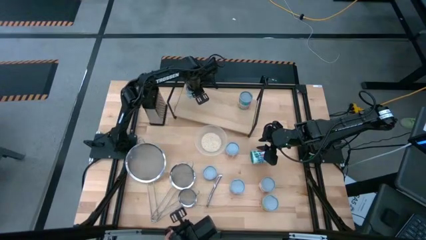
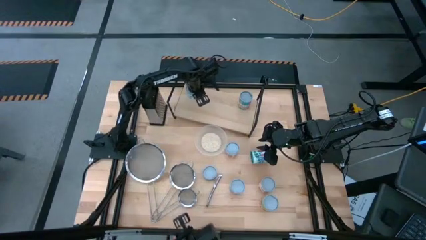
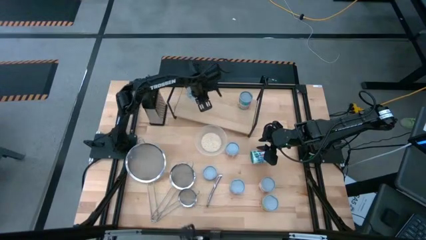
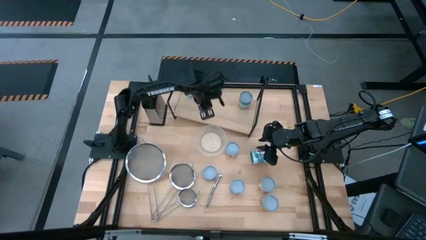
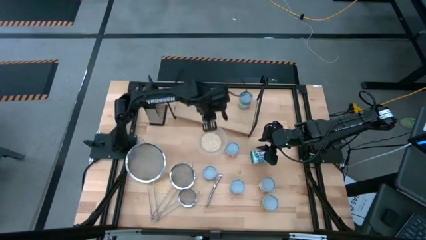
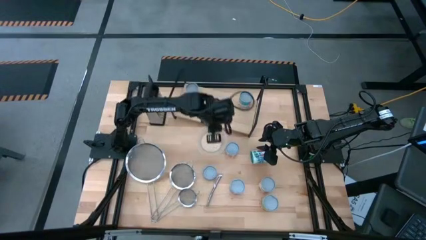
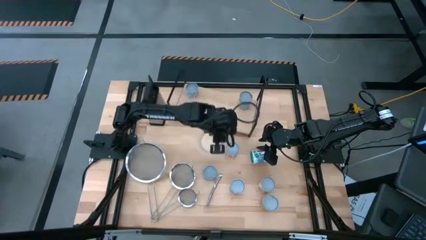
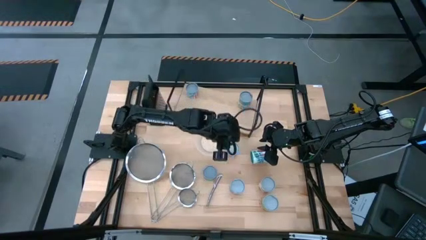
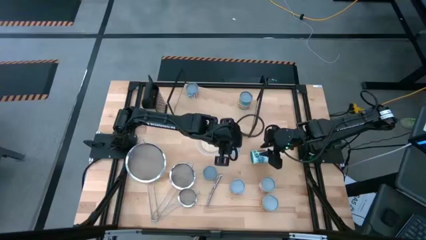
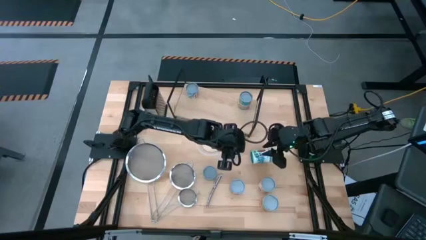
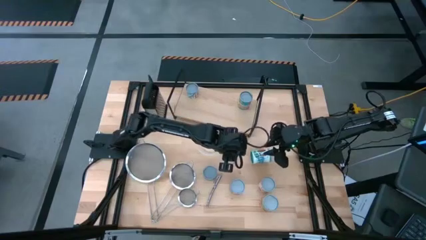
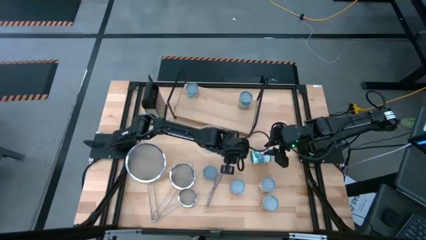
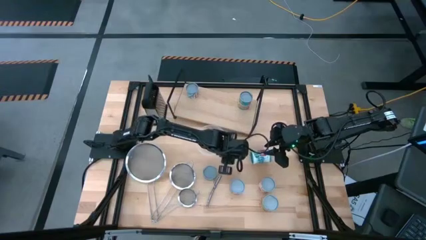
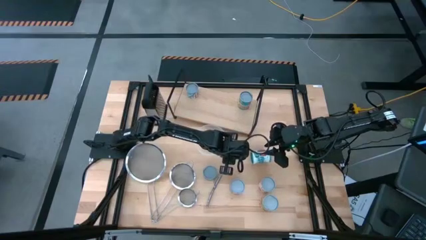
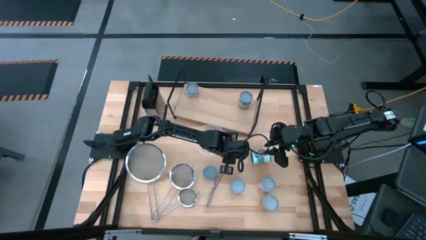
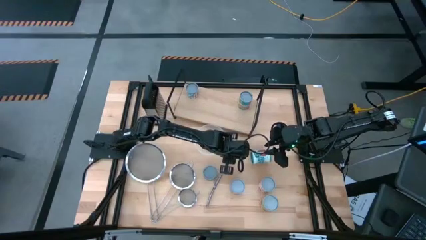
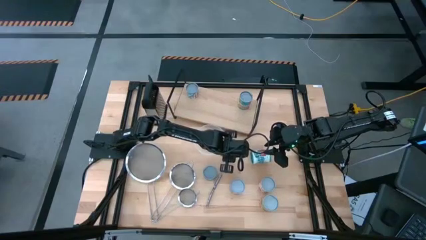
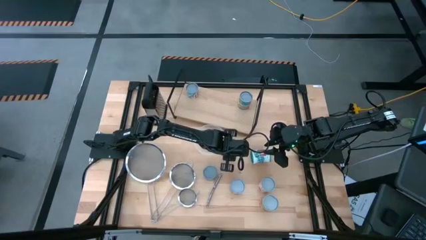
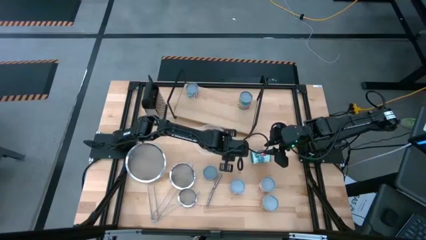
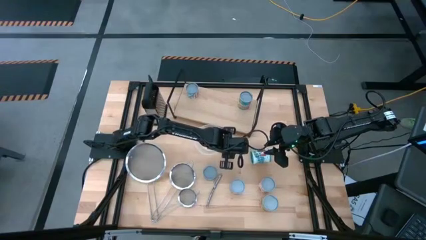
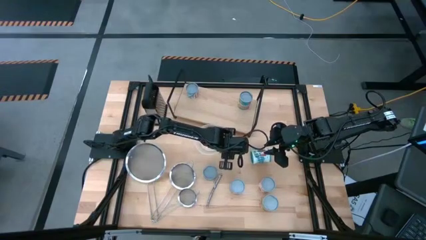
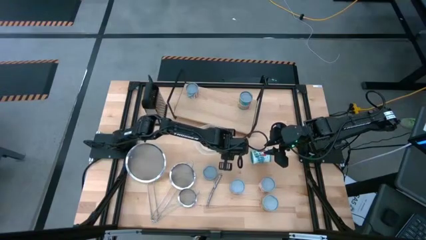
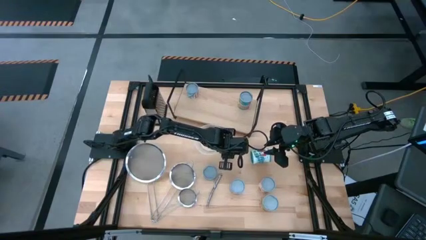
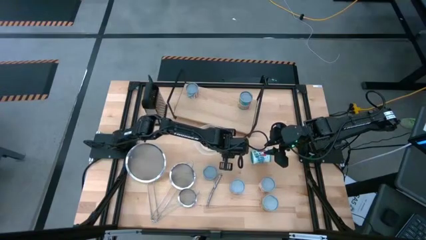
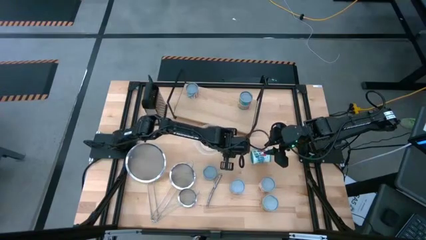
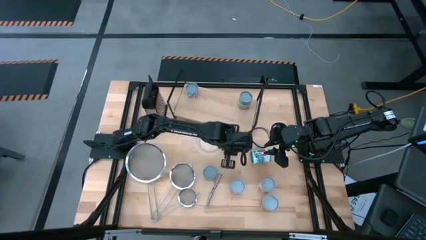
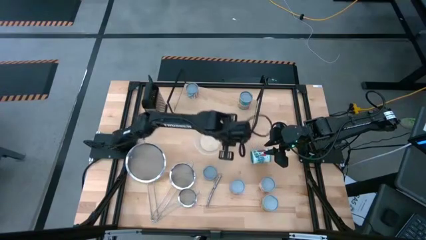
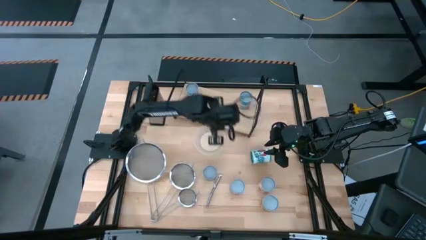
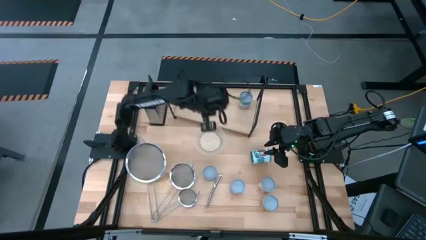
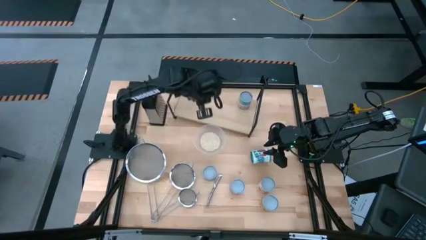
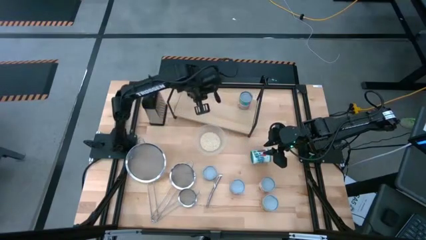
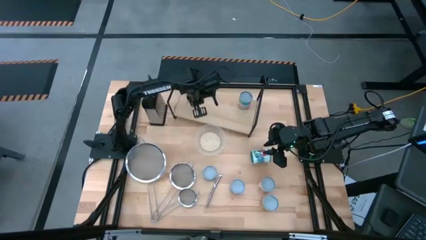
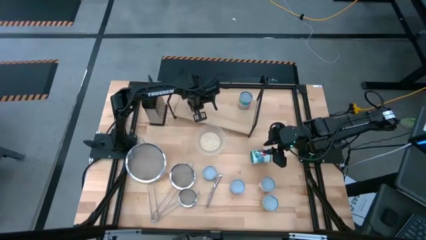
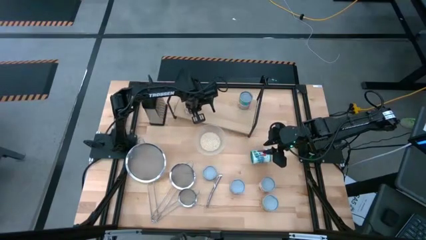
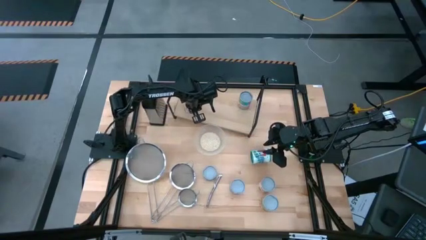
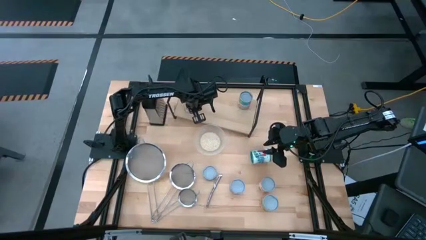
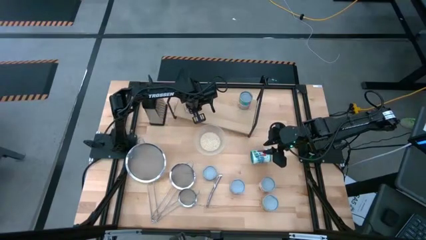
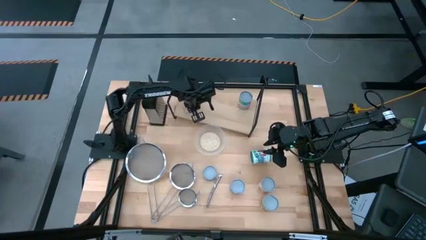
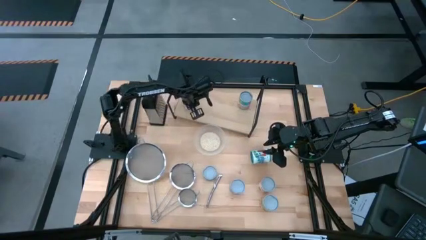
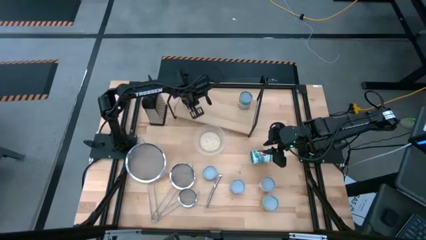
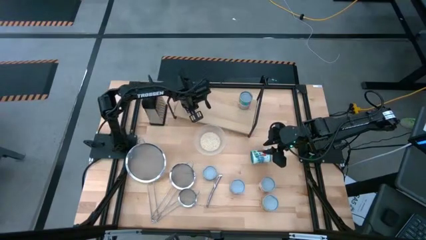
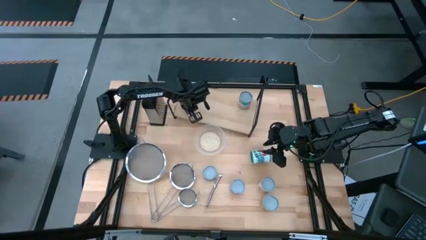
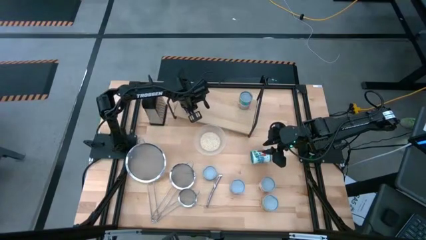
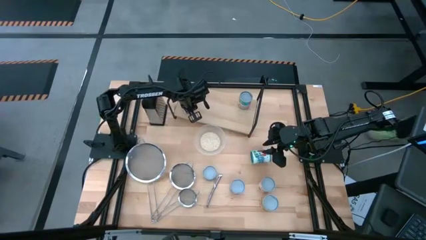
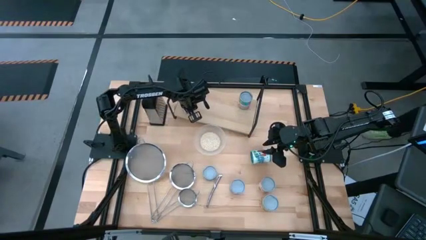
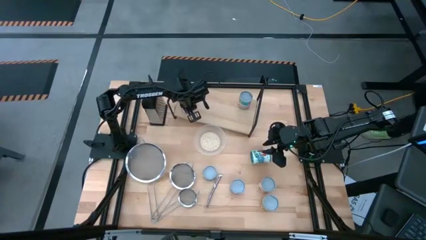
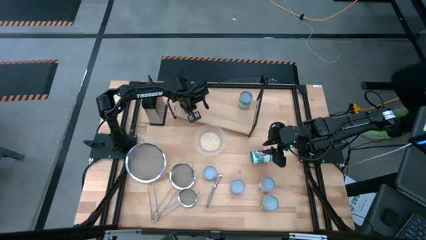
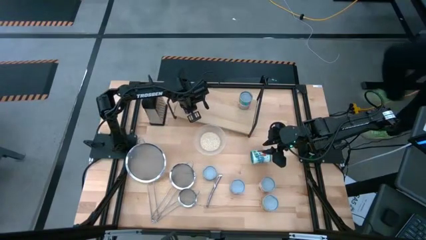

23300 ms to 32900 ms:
Task: Pick and place cans onto a shelf
Put the canned tomatoes on the shelf

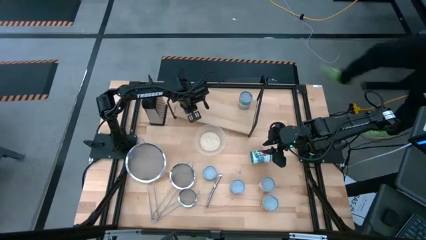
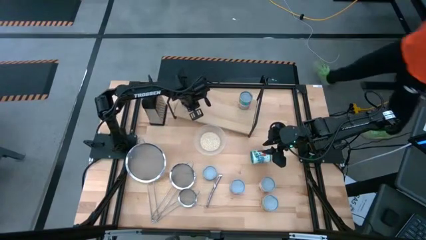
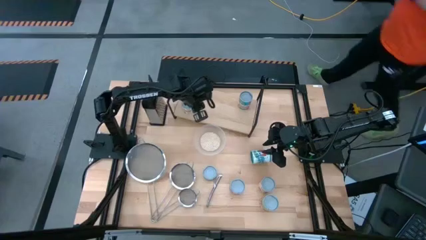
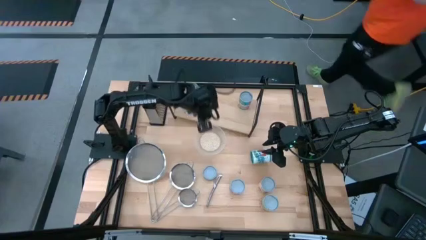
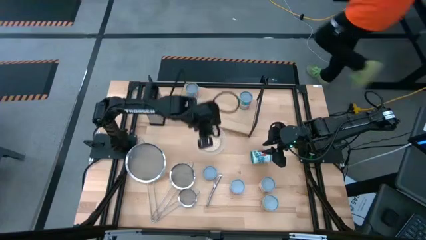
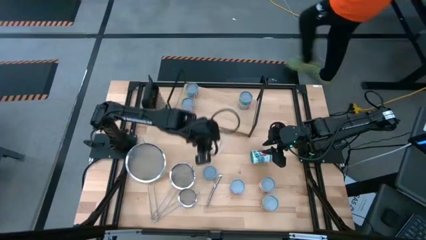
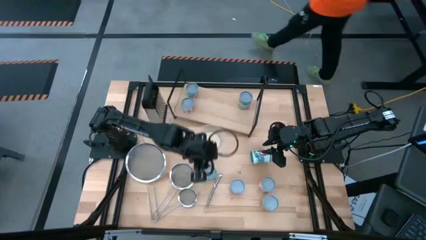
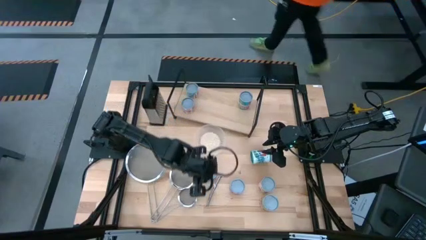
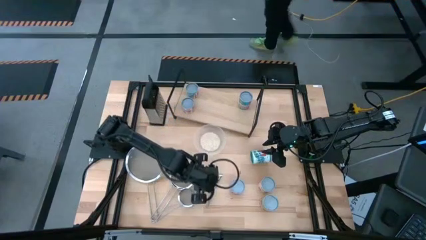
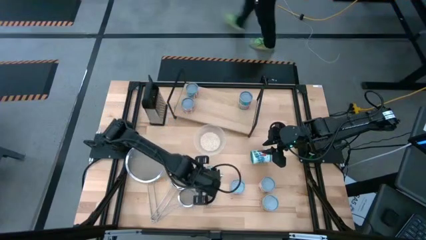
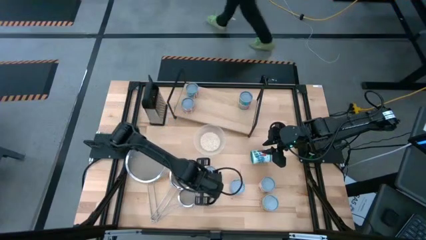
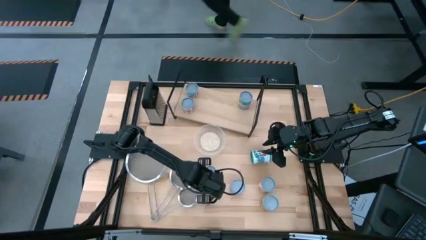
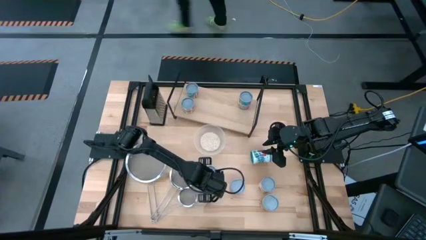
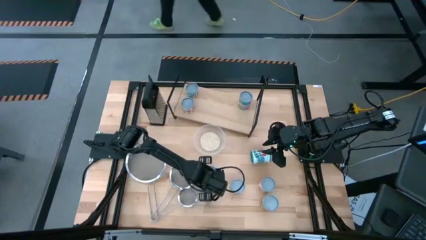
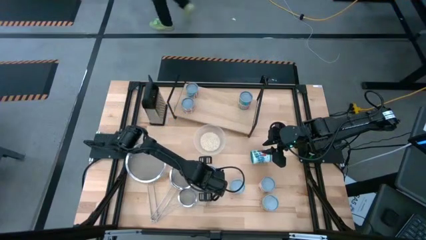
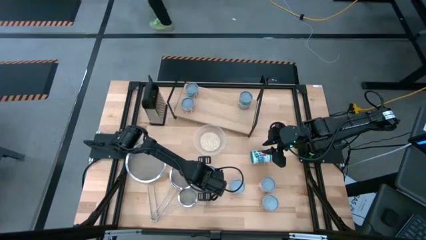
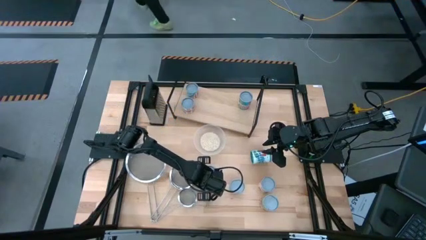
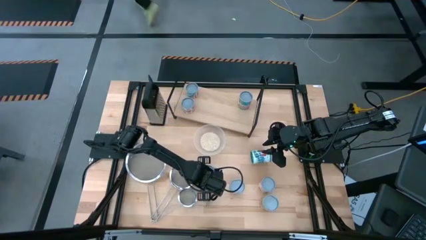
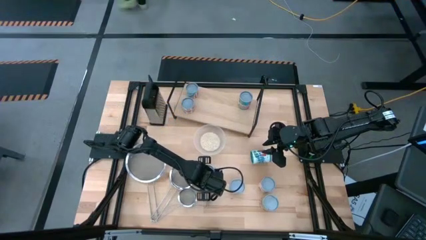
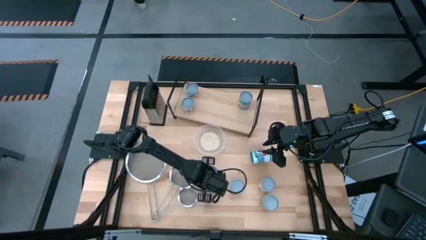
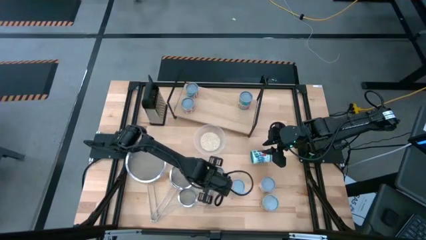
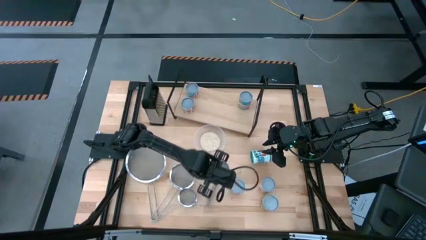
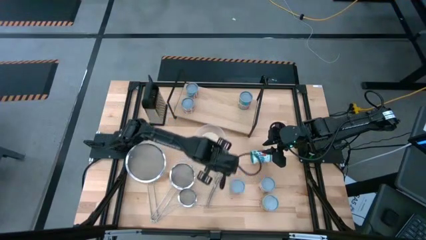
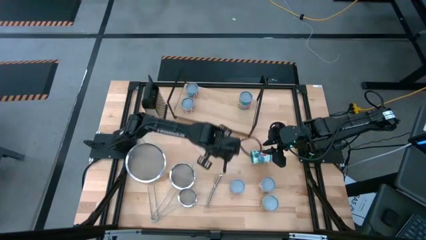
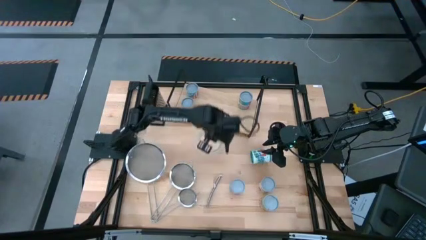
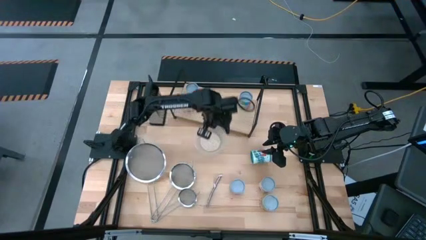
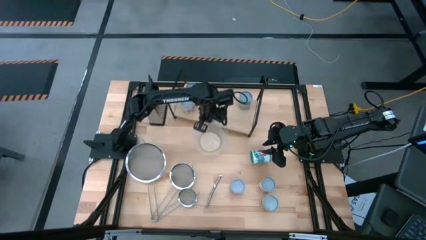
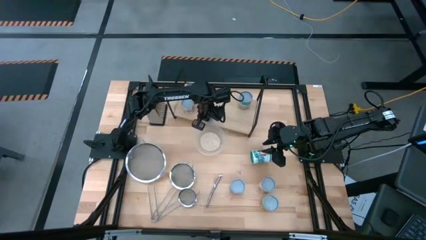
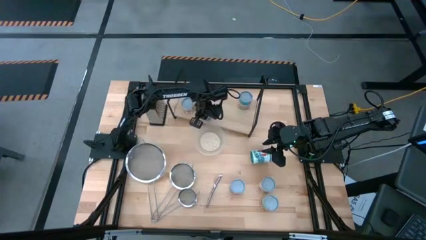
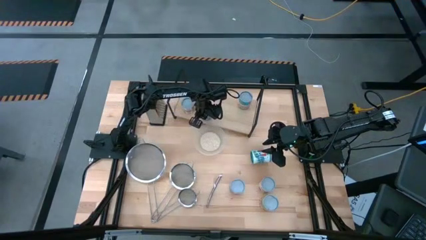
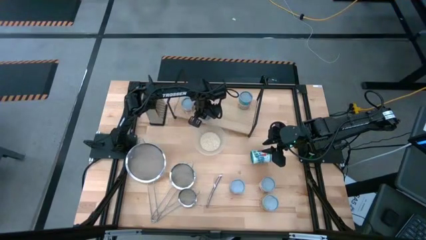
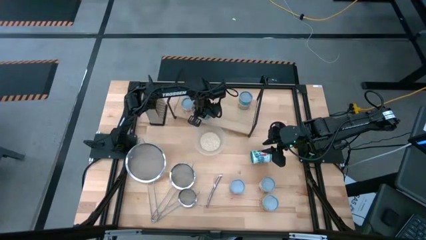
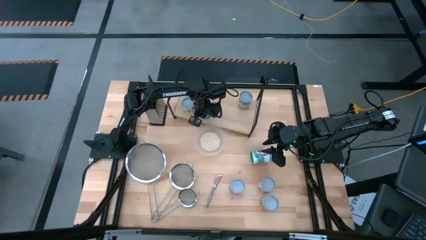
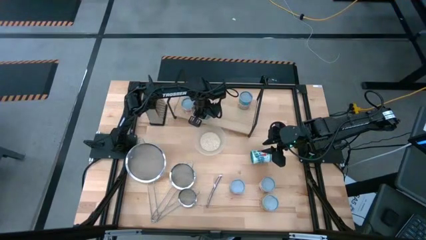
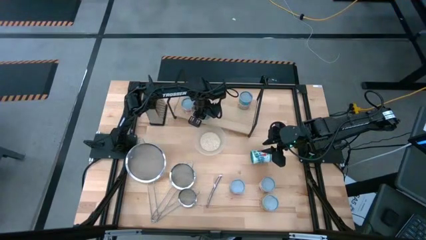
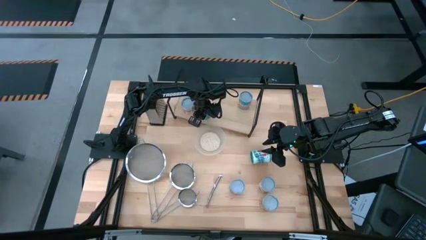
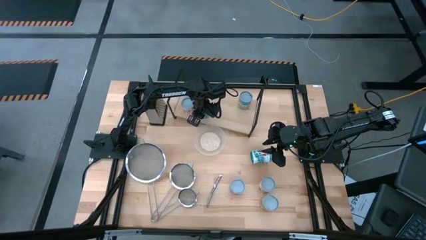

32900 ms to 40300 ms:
Put the canned tuna fish on the shelf
